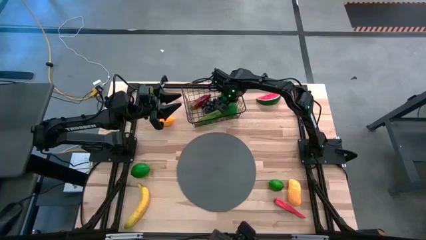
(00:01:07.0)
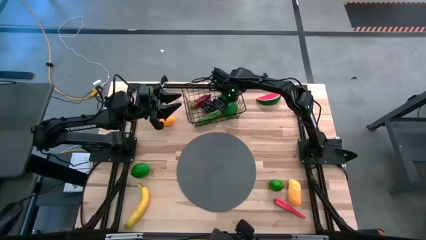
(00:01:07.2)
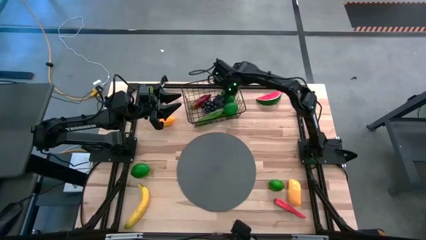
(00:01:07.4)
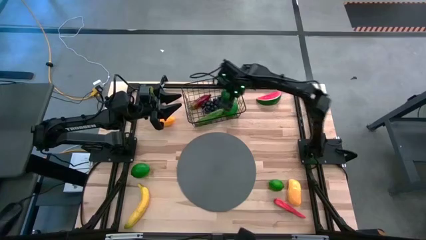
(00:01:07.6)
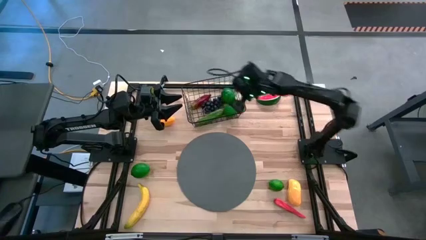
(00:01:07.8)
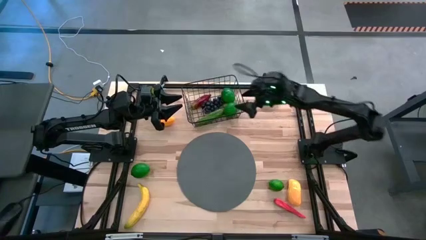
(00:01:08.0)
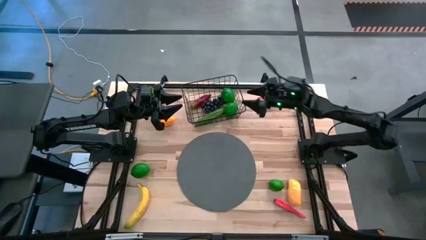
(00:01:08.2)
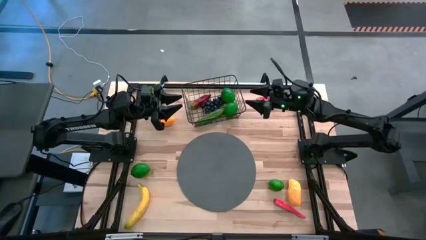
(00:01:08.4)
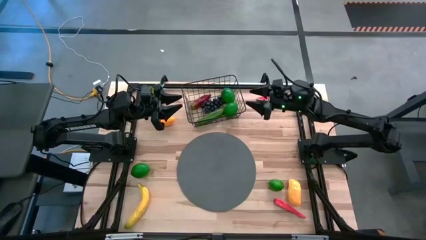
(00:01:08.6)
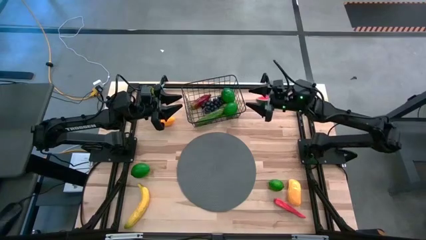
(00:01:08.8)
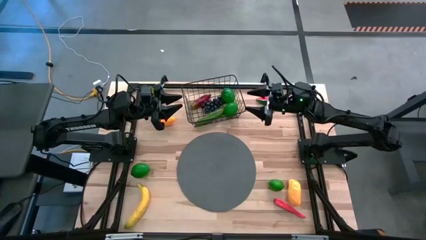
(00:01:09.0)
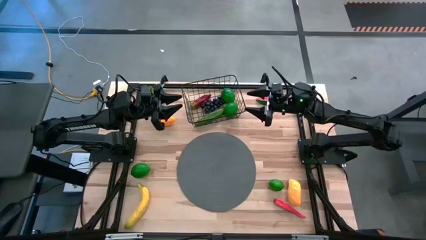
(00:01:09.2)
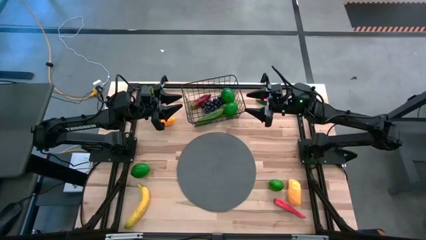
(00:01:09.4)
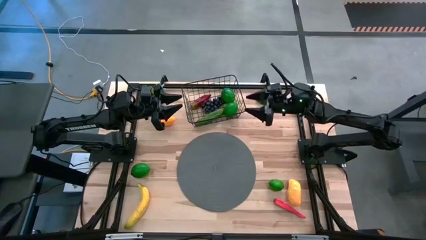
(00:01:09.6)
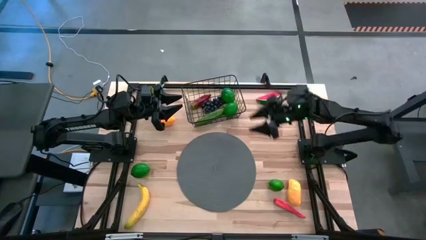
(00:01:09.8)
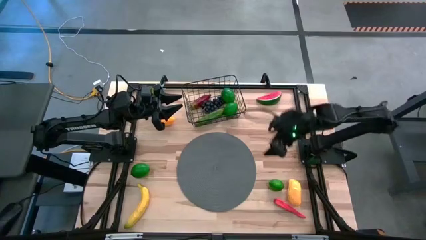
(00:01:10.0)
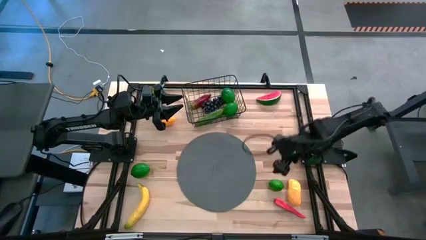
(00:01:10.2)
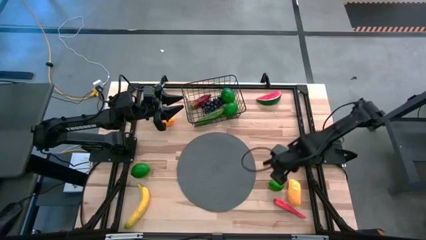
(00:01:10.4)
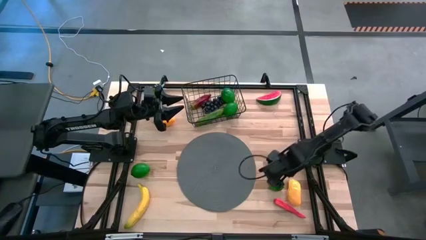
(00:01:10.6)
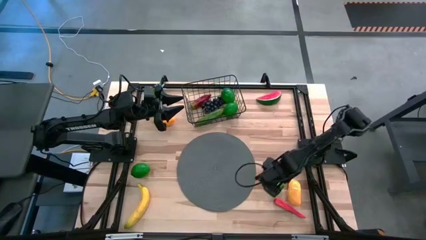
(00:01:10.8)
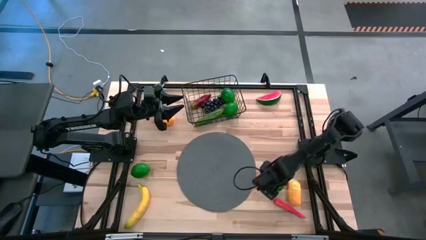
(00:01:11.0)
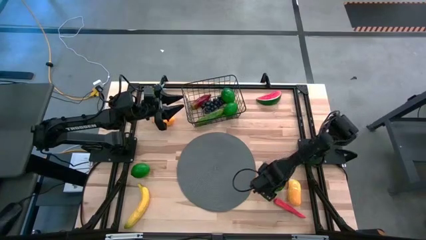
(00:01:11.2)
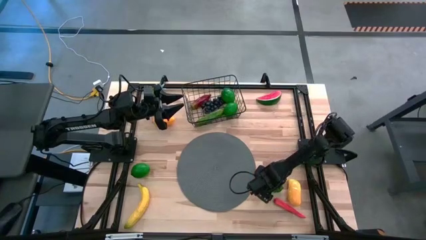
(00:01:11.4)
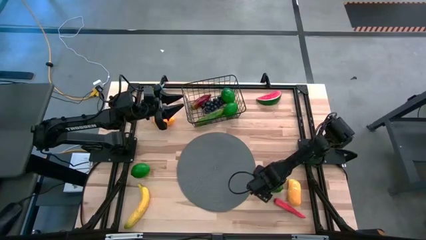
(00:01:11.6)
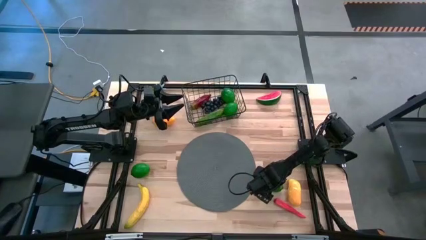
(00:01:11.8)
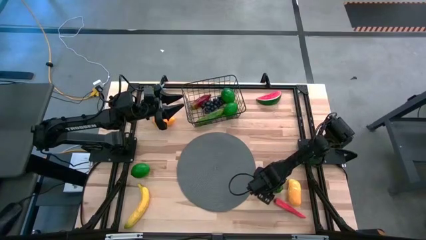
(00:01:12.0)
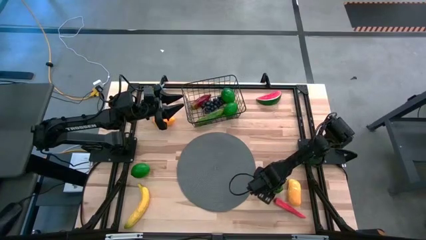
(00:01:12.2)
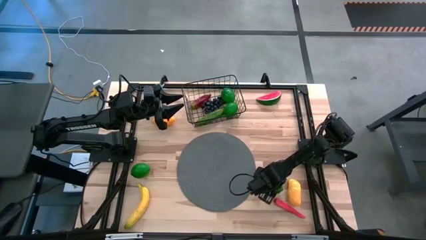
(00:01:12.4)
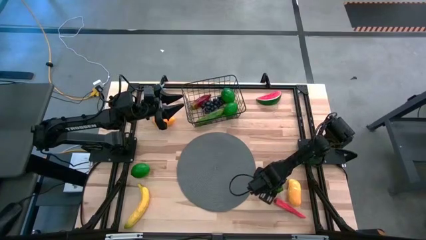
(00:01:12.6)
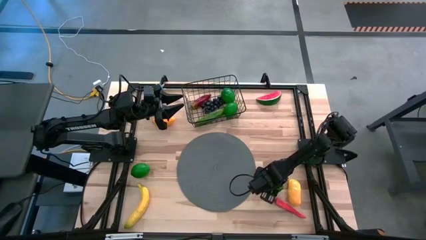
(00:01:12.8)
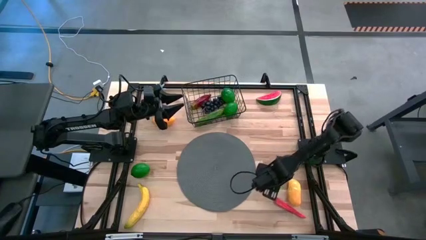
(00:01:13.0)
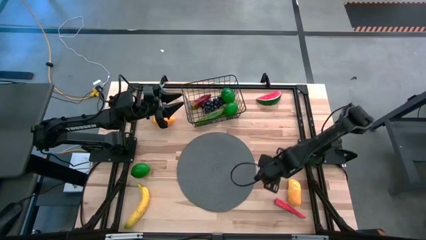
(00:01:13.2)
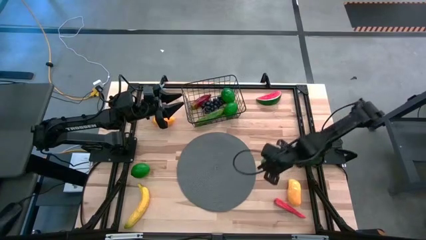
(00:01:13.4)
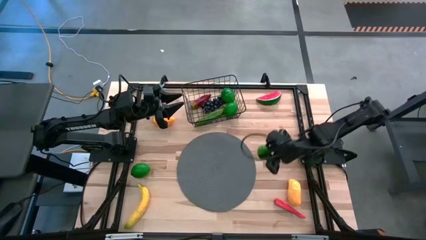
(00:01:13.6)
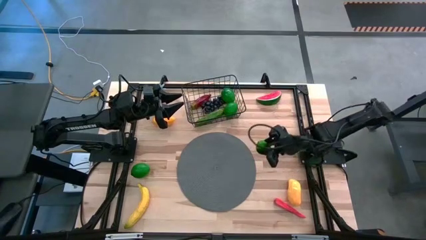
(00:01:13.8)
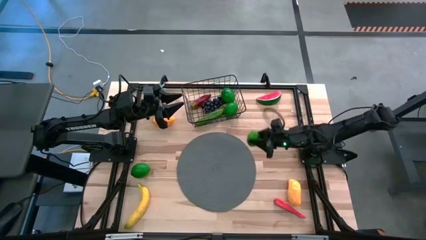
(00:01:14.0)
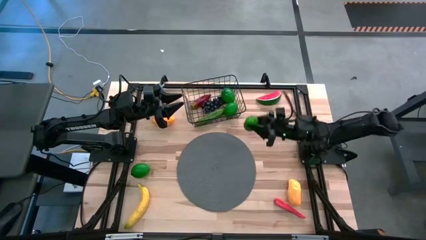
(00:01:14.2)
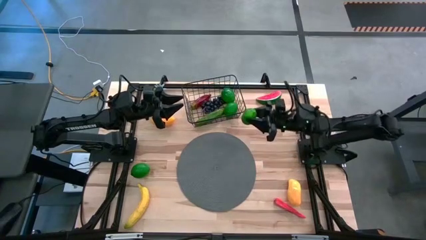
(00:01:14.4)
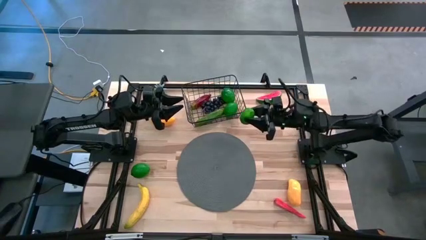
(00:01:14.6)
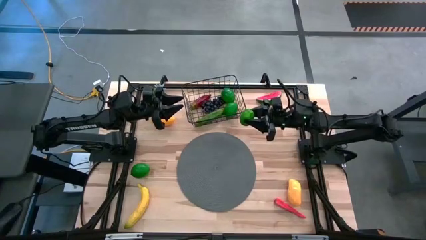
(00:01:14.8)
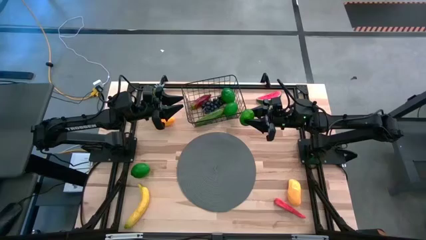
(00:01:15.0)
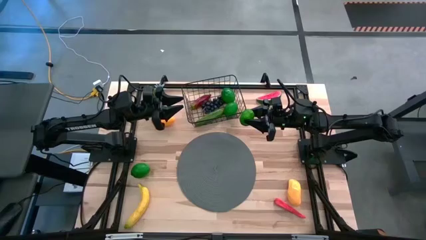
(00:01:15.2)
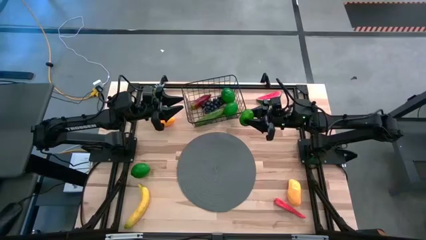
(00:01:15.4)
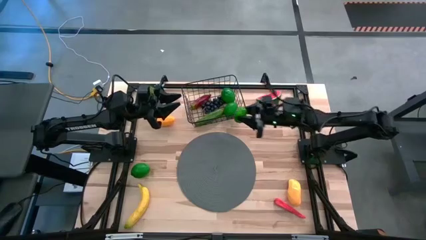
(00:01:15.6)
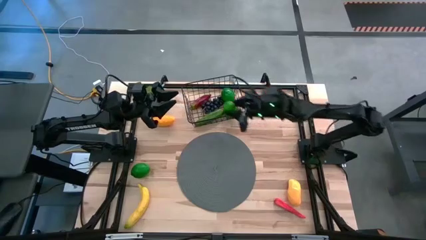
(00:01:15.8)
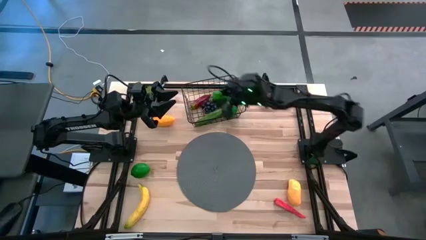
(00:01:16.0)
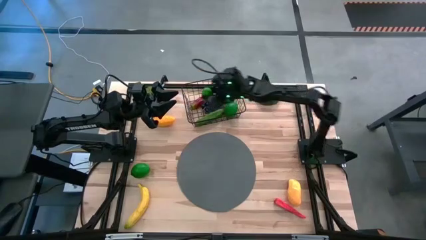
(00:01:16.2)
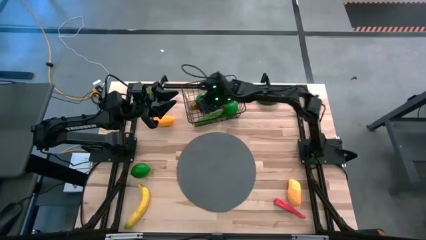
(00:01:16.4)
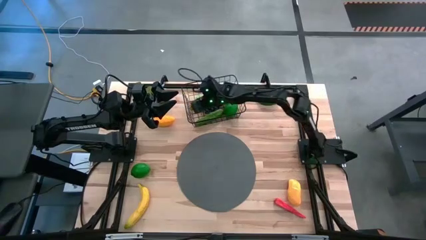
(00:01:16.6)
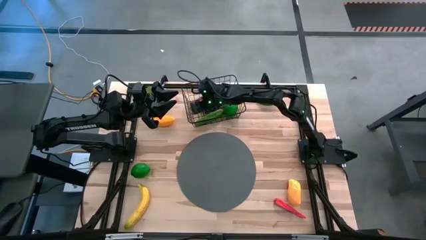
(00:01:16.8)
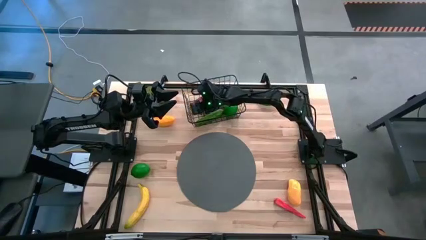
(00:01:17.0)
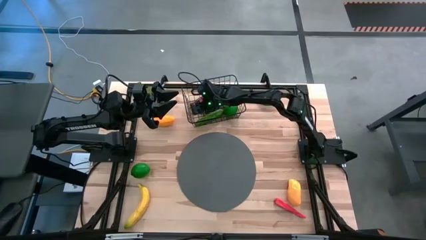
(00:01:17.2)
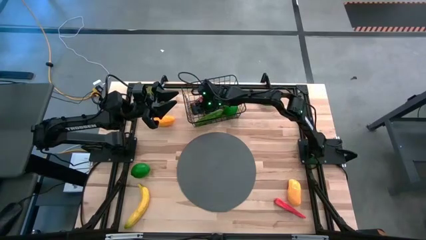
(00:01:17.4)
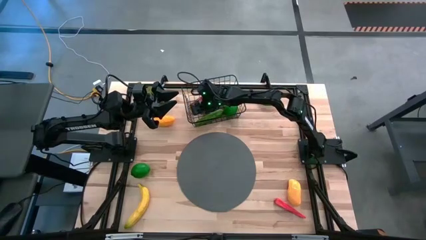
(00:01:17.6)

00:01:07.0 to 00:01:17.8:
Task: Build produce basket
Put the green lime into the black wire basket
